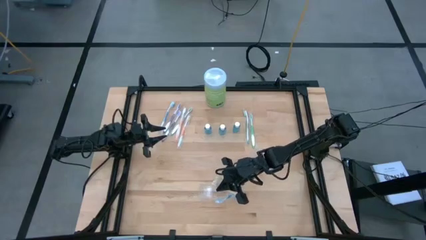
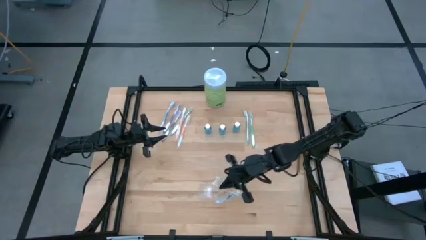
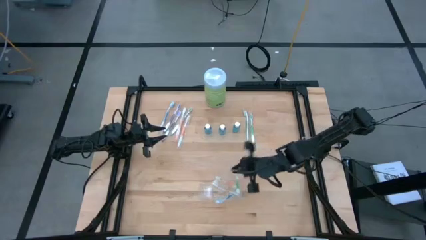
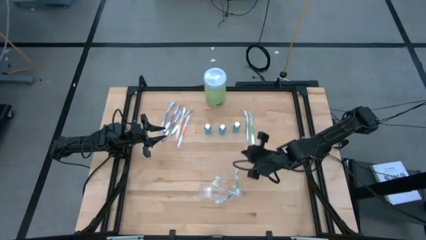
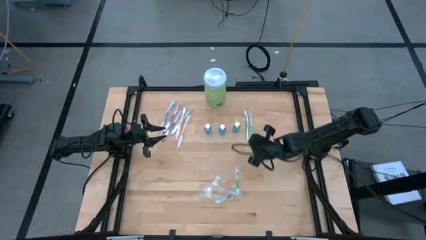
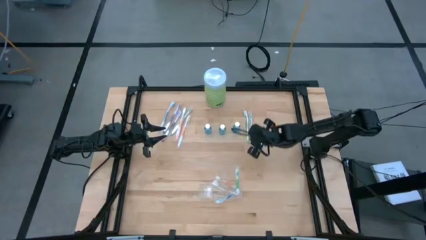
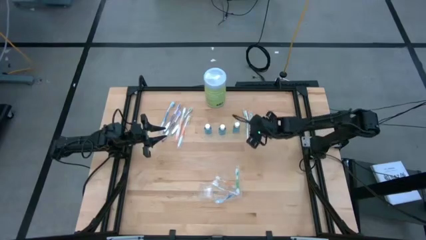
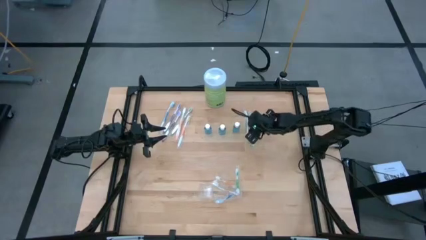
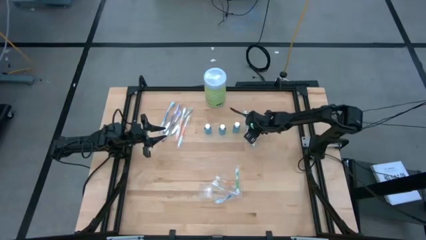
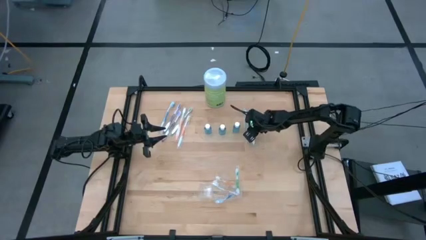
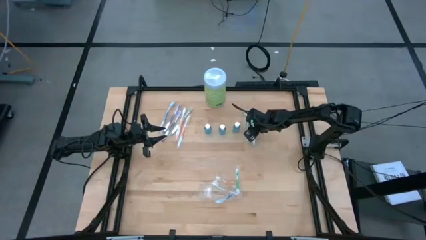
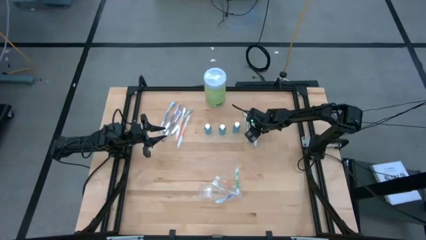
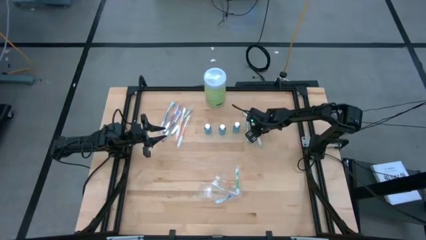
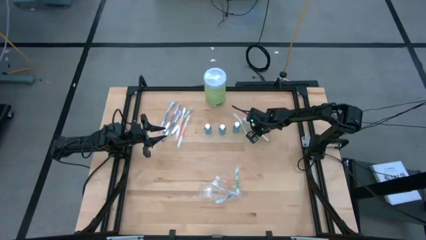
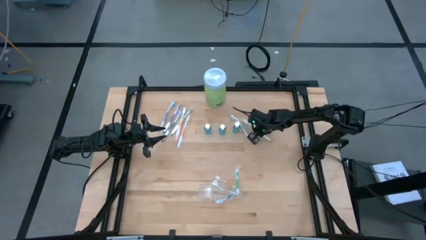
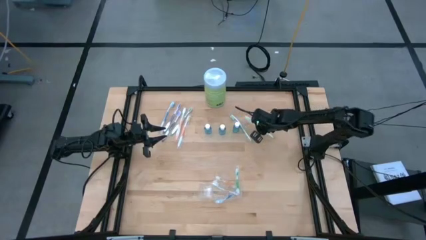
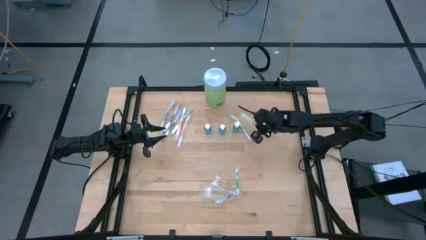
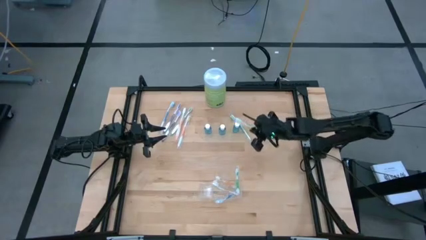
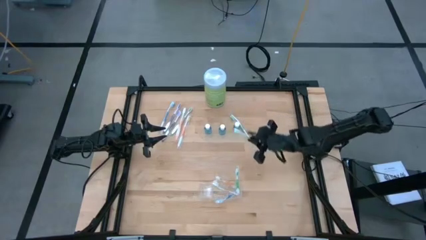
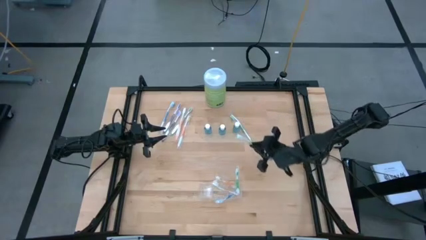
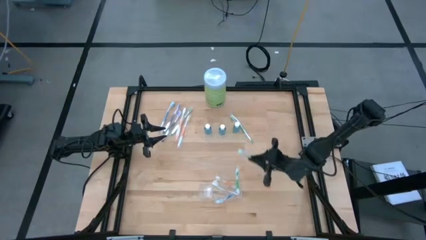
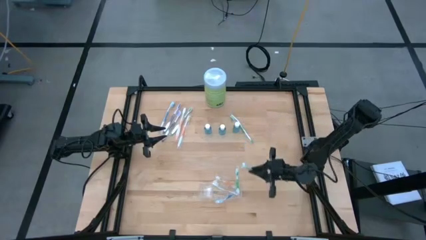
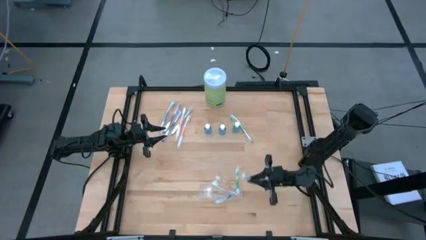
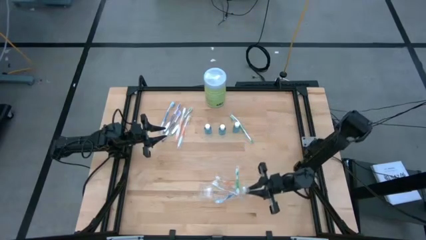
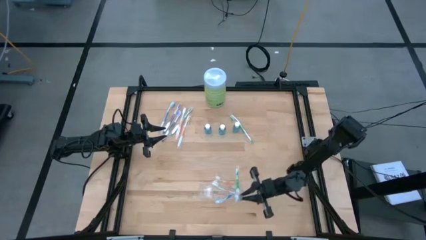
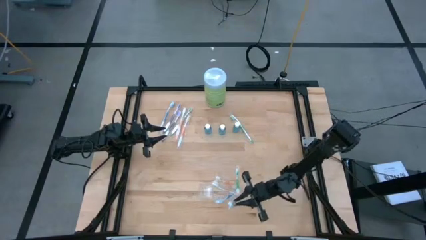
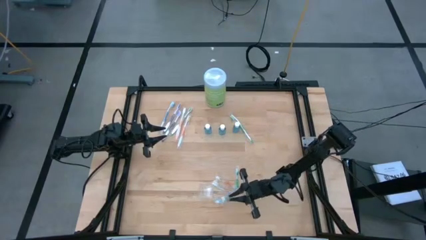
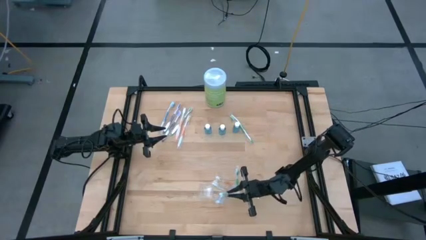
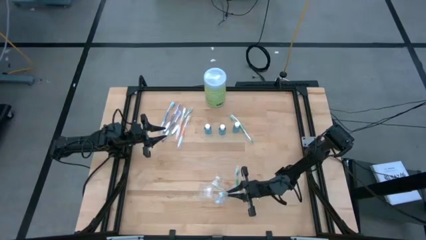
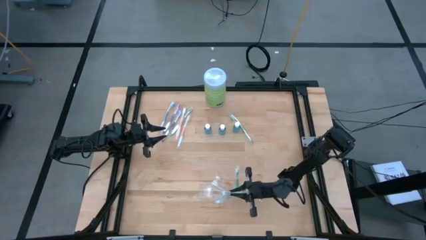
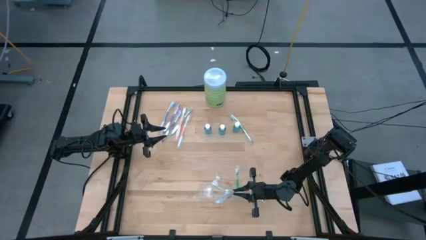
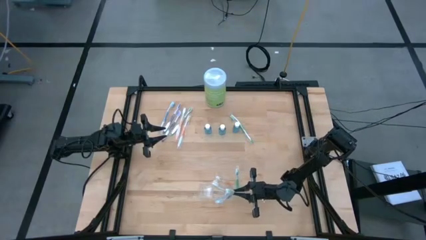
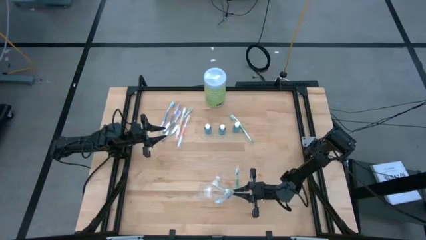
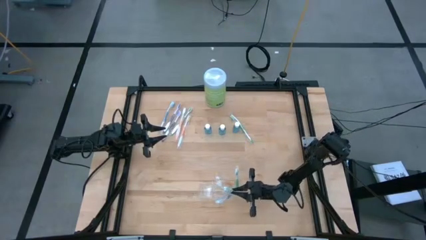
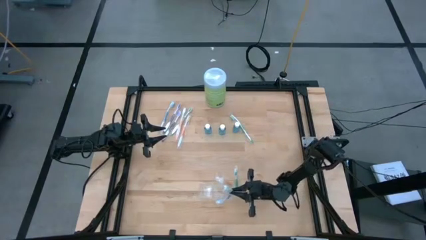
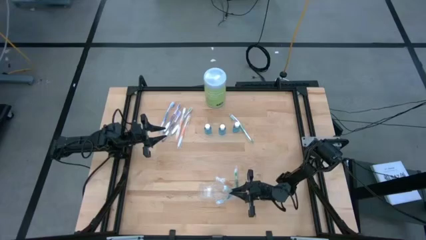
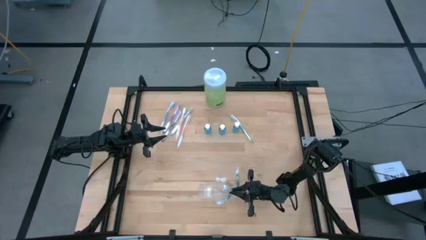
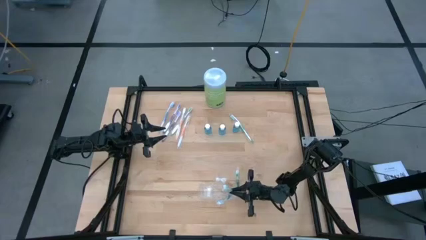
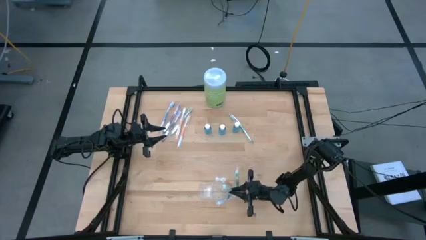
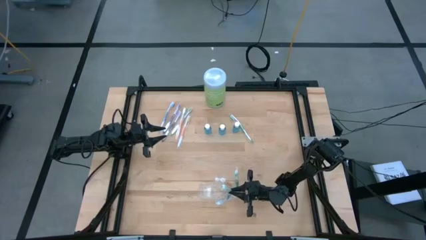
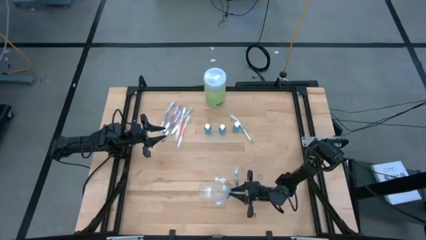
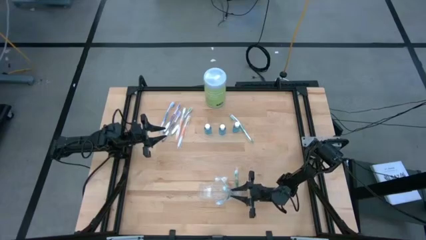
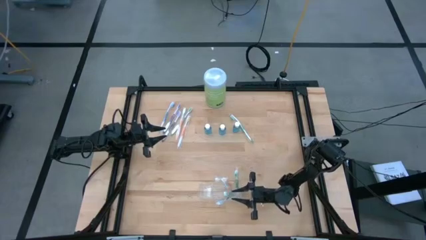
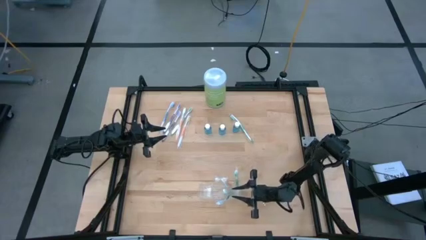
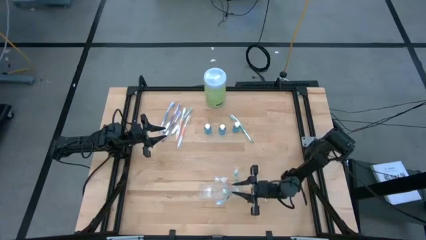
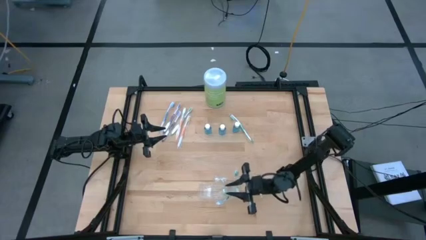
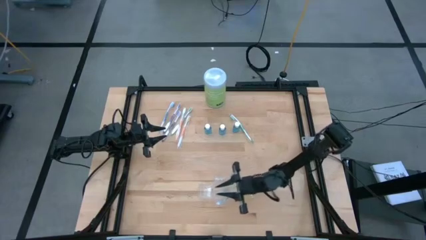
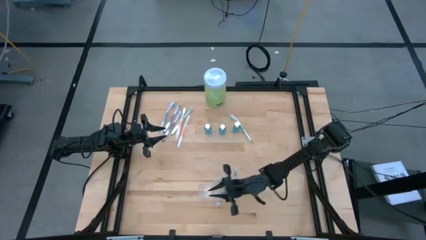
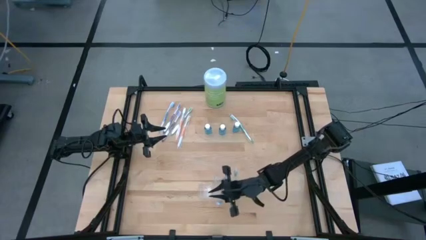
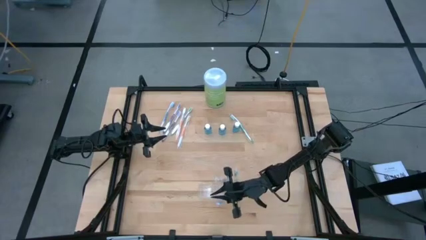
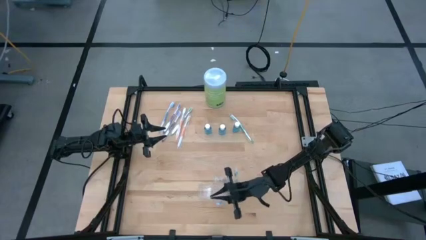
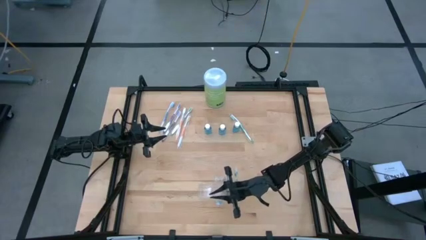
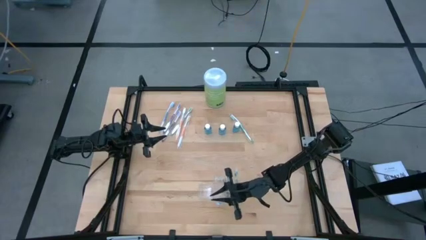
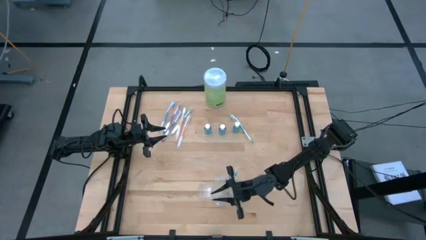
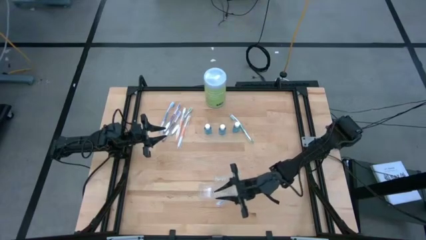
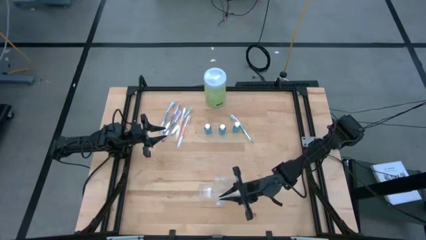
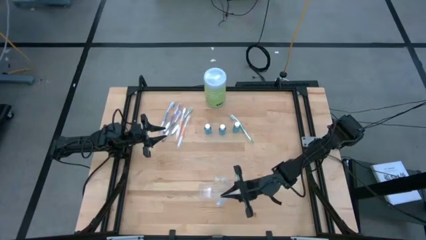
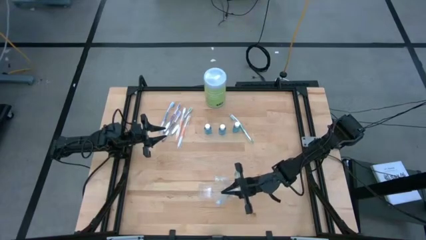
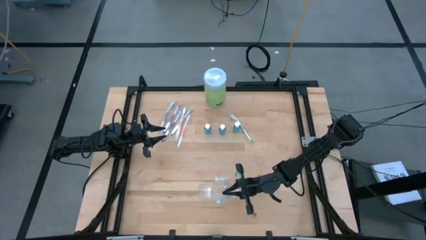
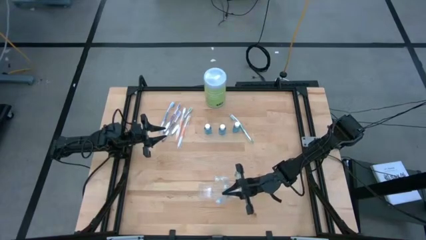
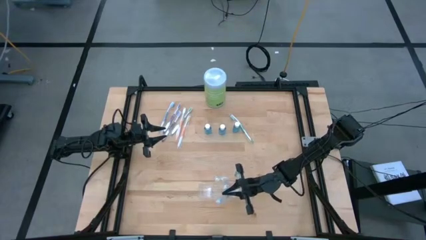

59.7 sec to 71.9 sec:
Task: Pick & Place toothbrushing station
Put the green toothbrush into the transparent organizer
